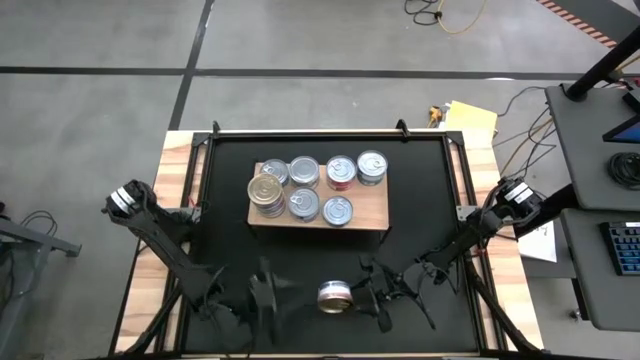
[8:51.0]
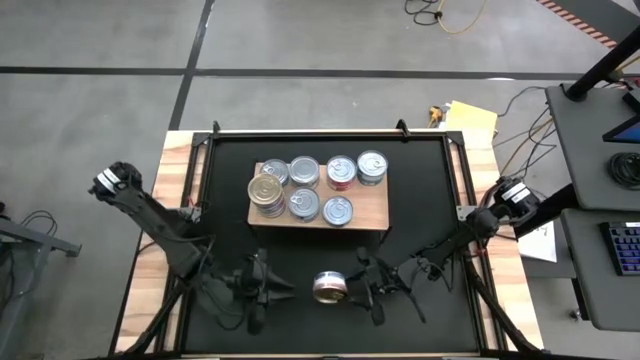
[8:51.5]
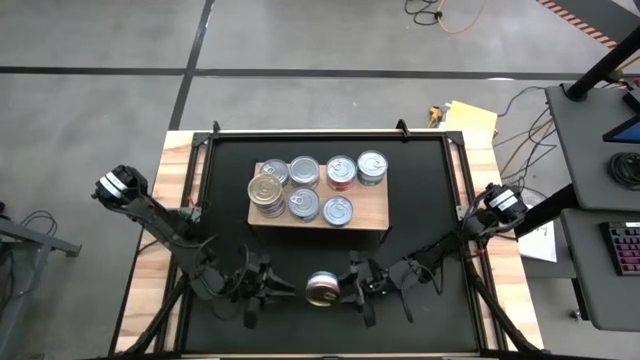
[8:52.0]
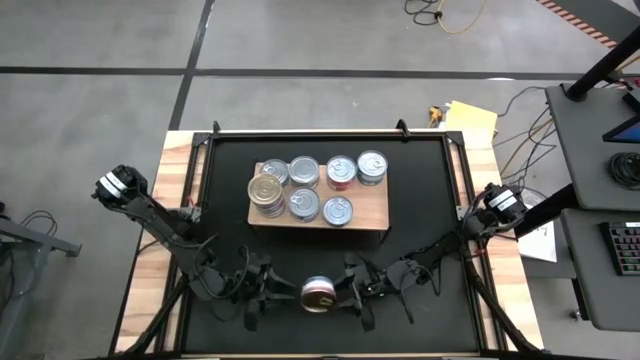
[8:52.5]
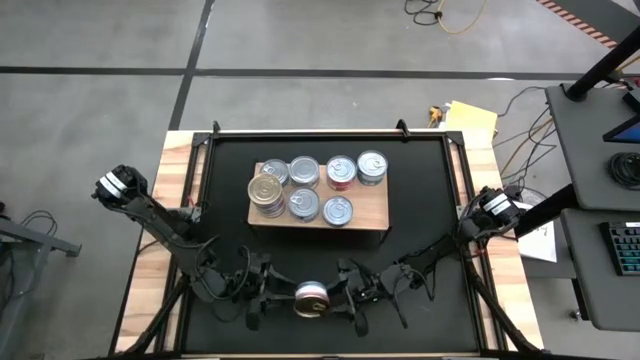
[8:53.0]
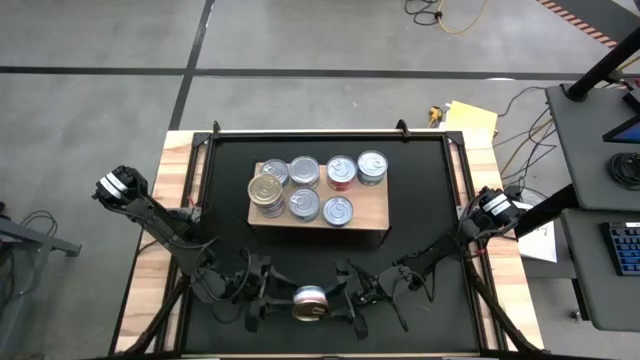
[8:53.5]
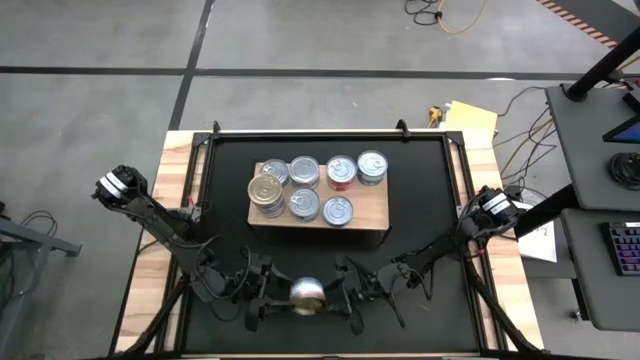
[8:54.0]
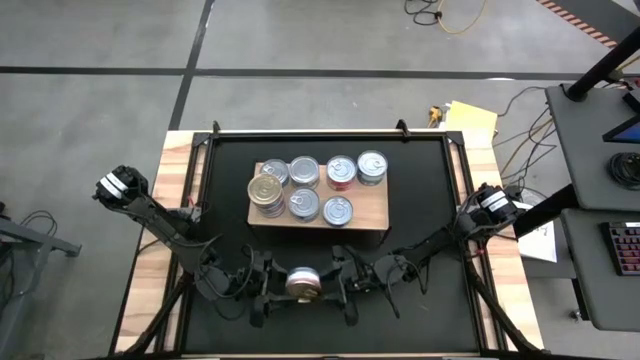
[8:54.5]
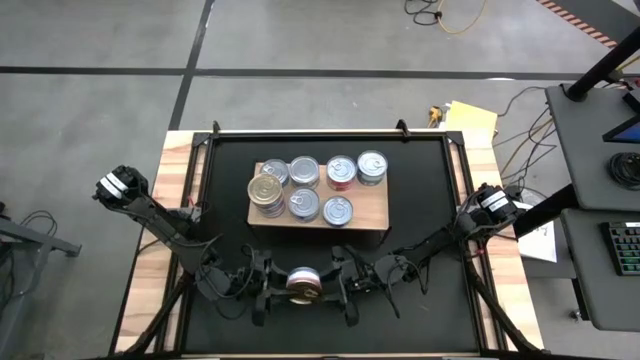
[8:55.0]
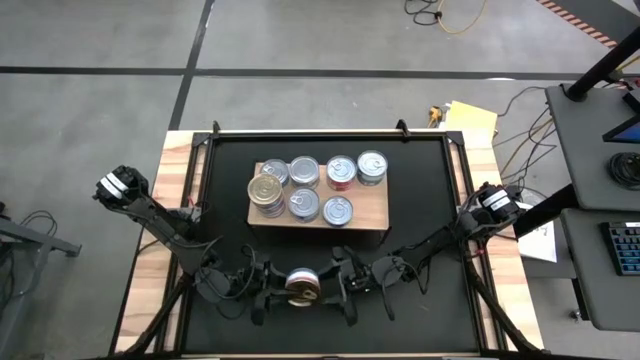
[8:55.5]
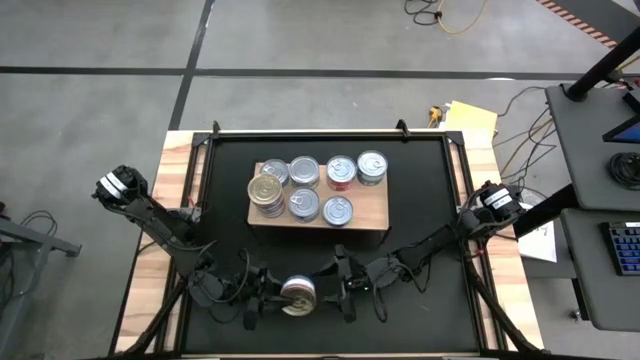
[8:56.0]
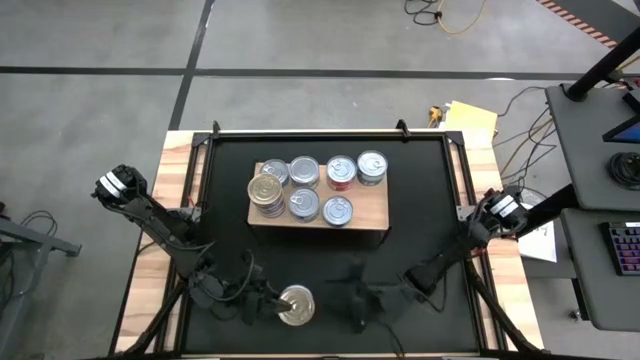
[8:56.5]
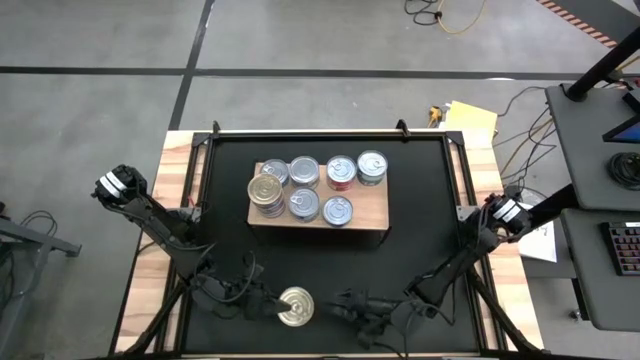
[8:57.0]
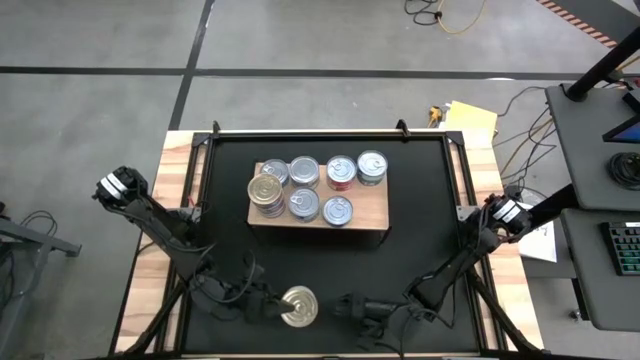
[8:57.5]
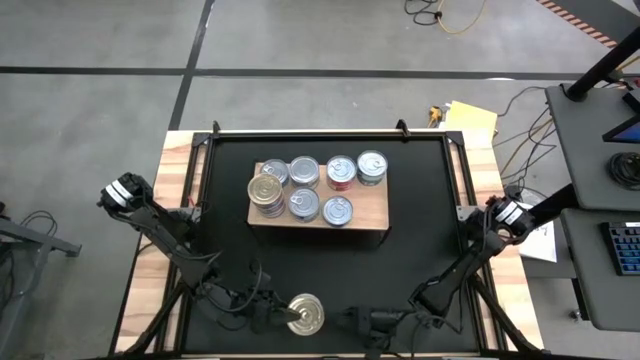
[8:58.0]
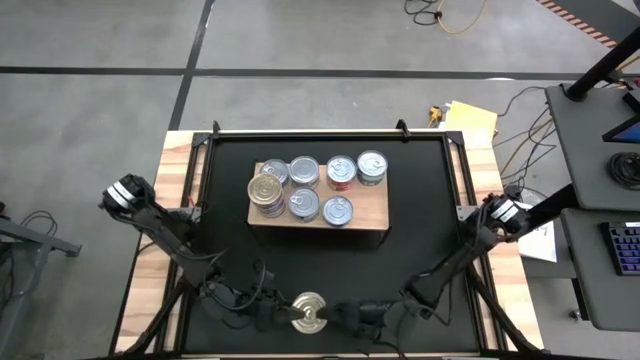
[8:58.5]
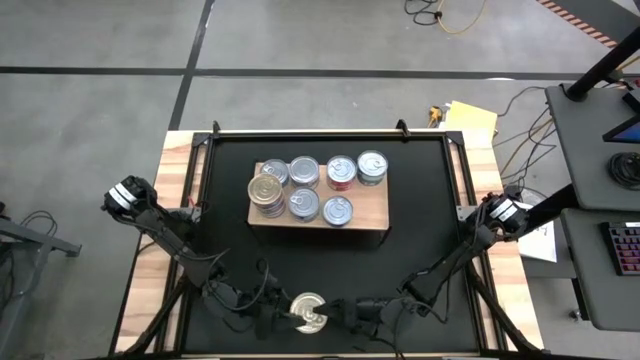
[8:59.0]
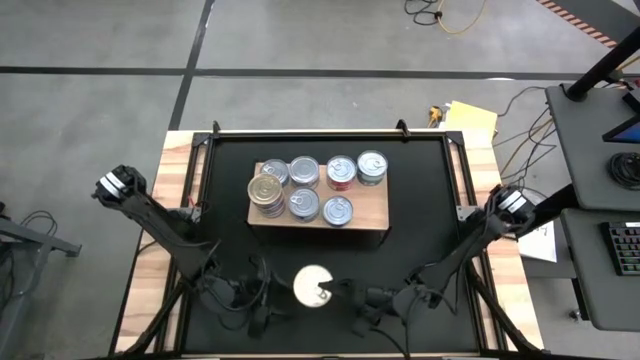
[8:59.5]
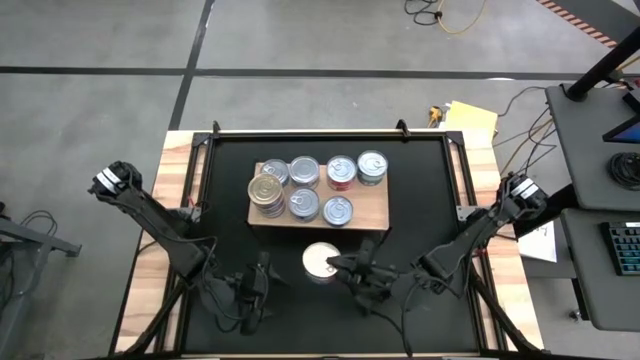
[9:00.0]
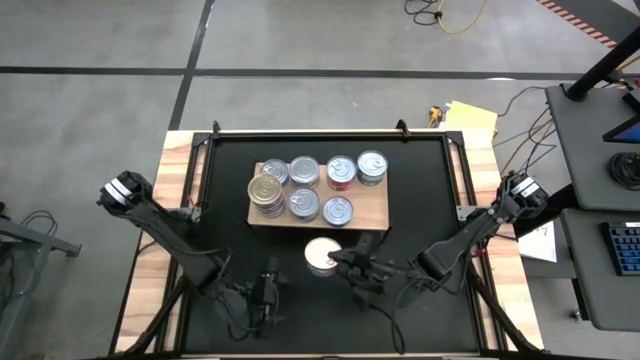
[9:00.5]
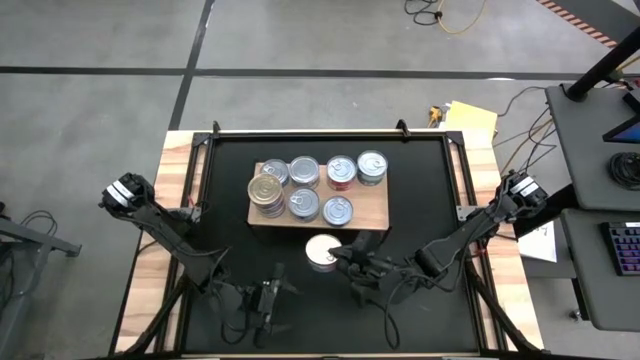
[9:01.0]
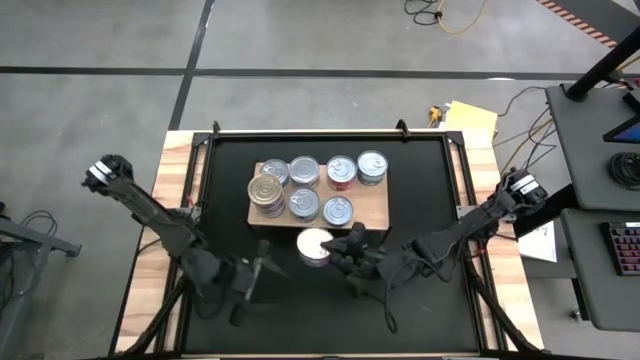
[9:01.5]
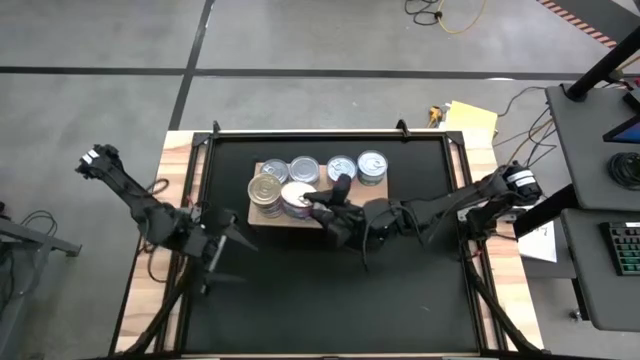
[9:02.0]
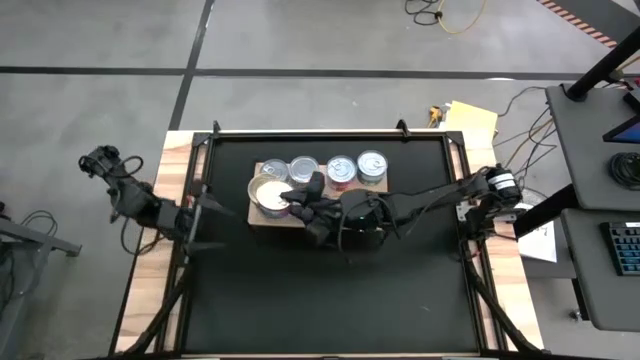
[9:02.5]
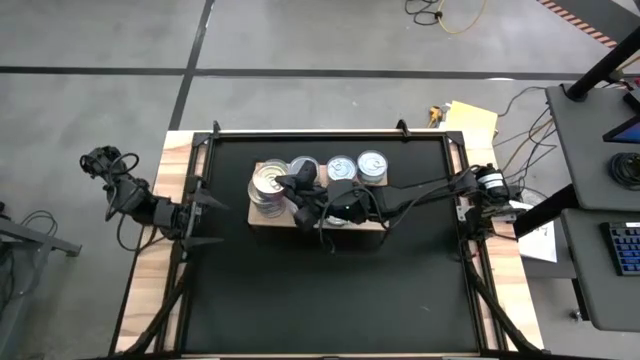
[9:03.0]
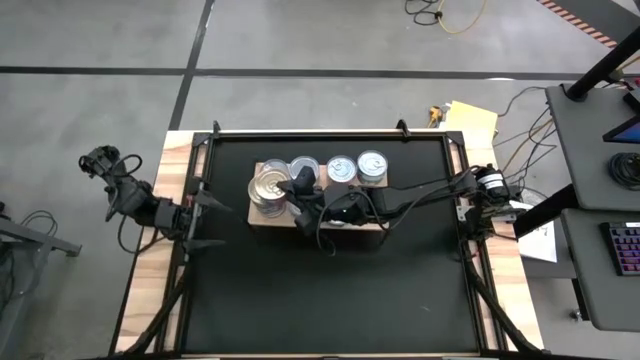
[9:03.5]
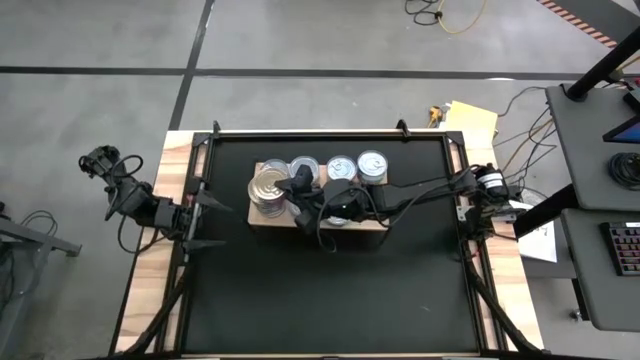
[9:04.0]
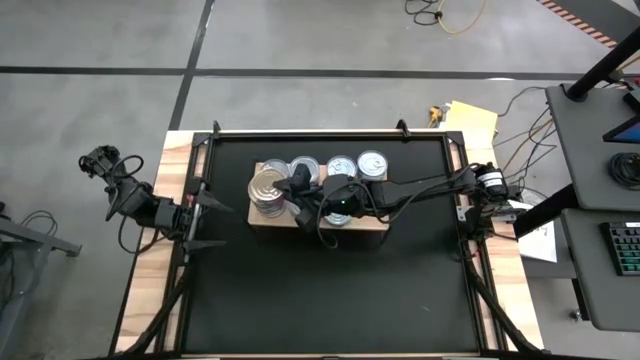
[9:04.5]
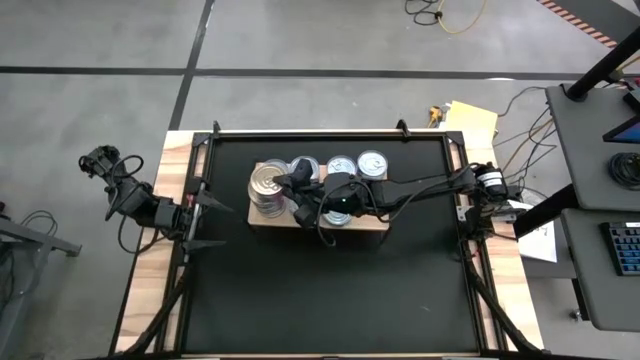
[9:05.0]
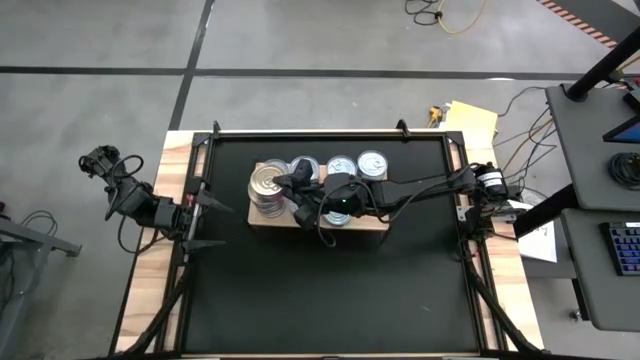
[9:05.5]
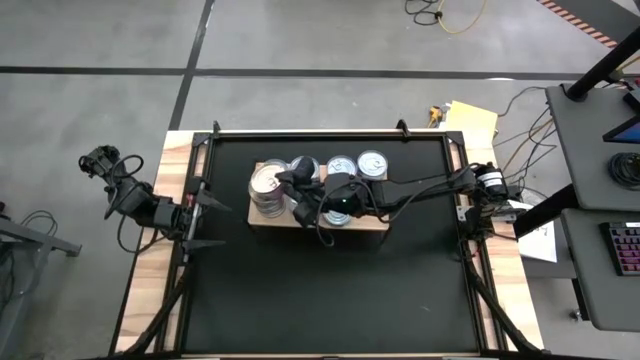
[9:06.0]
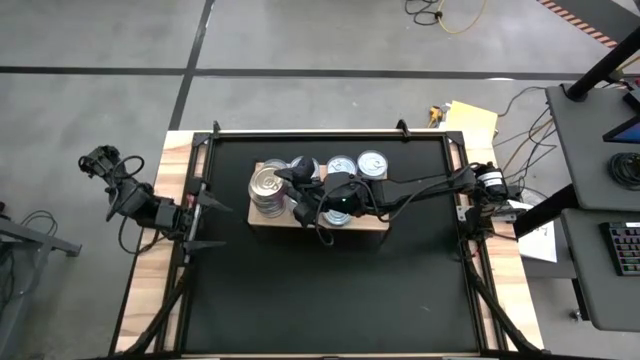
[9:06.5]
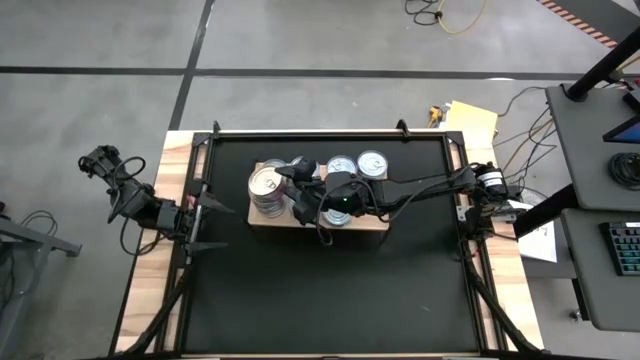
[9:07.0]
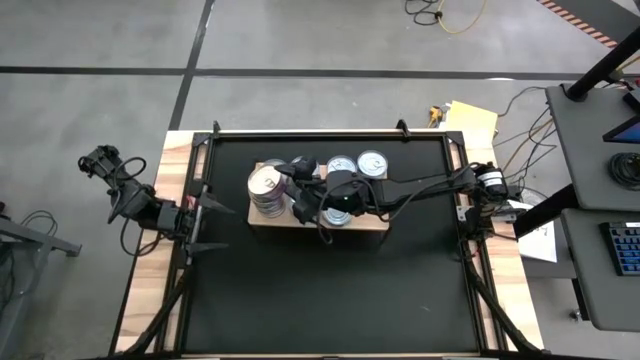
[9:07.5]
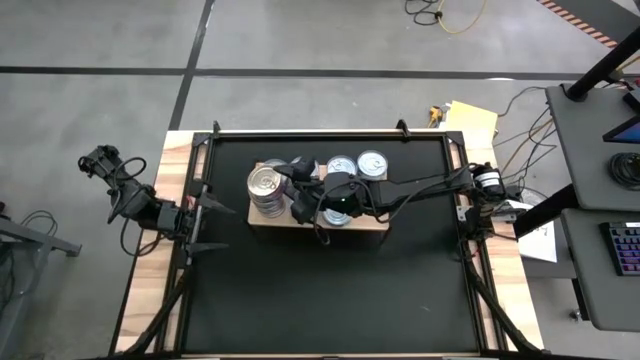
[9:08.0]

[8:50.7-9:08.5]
Task: Stack canned seafood by type on shelf
Stack the blue tuna can on the blue tuna can

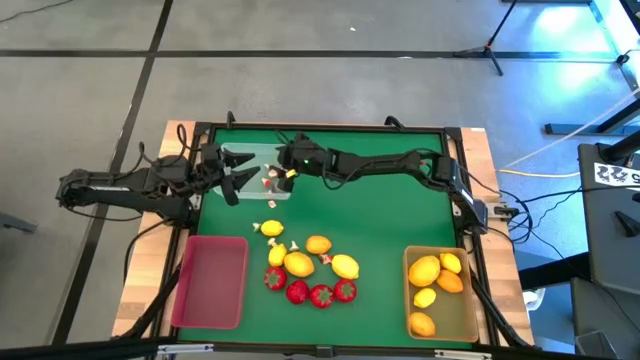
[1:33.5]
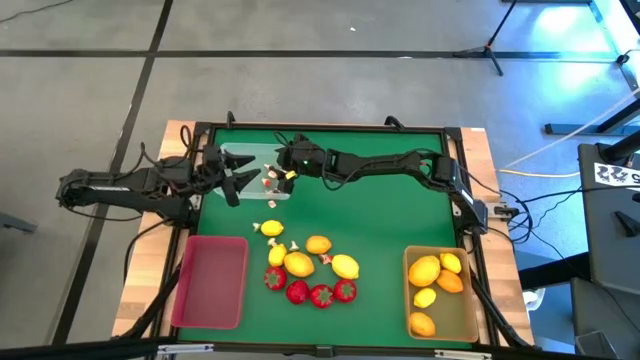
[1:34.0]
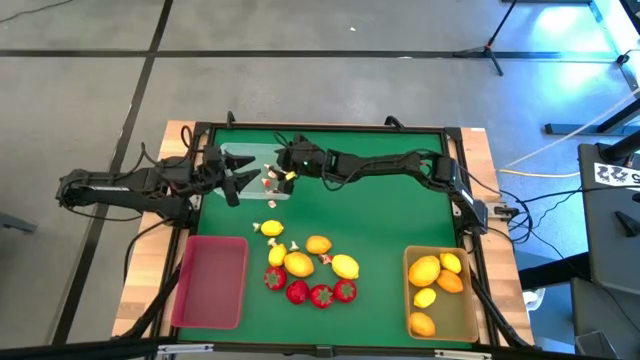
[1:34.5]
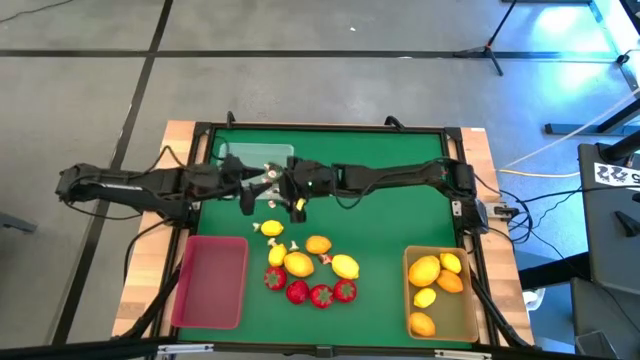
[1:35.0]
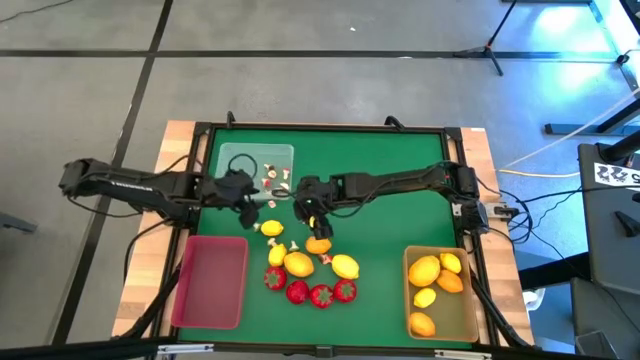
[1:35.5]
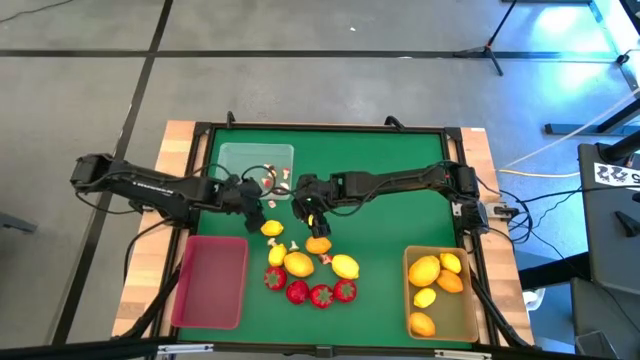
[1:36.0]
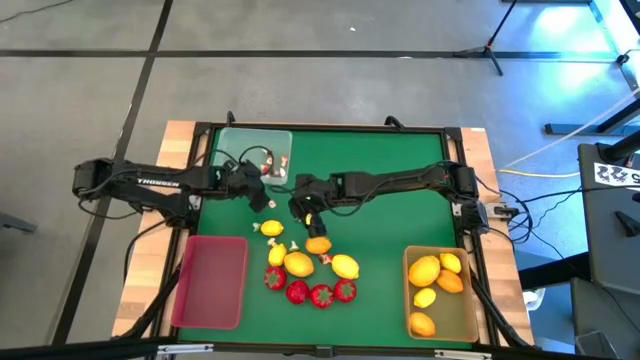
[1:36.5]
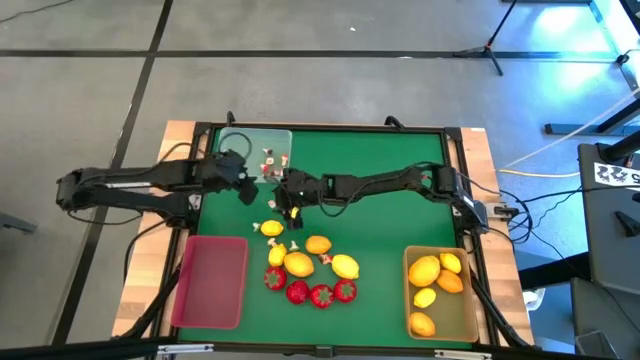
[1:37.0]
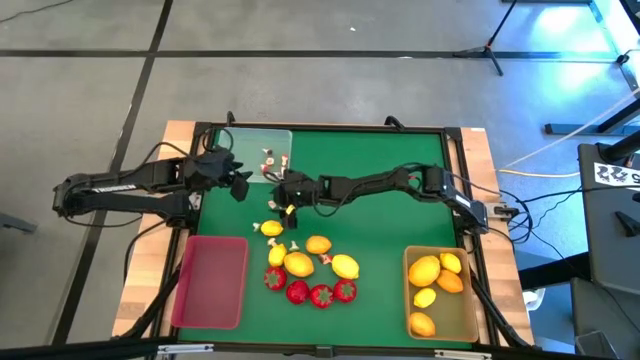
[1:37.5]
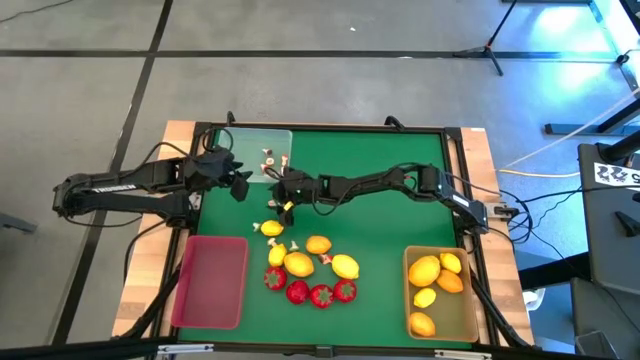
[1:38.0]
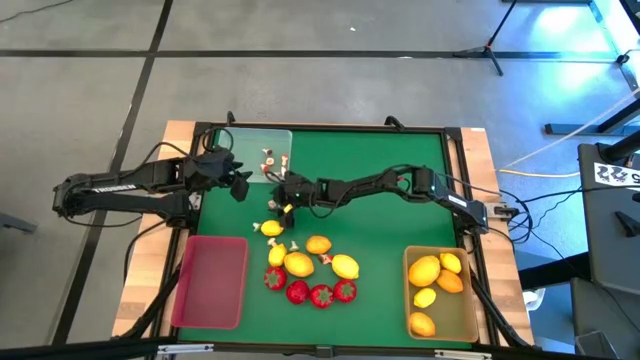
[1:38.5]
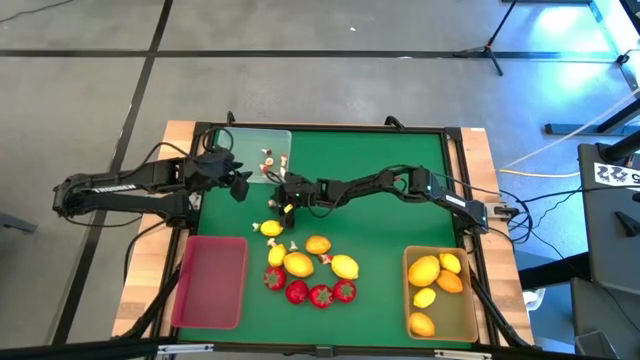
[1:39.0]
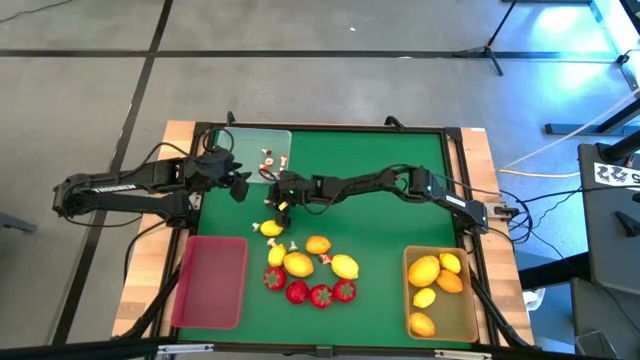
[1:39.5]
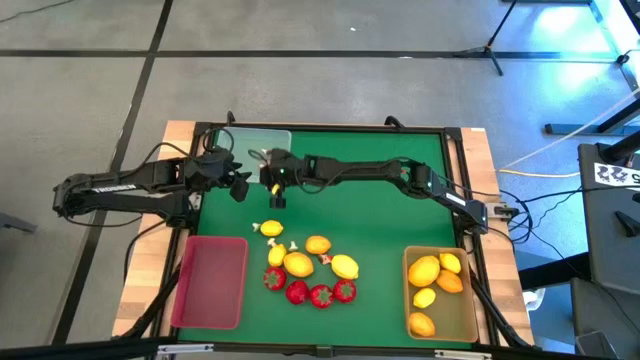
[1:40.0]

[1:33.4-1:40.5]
Task: Sort produce into baskets
Put the brown mushroom into the transparent bin
